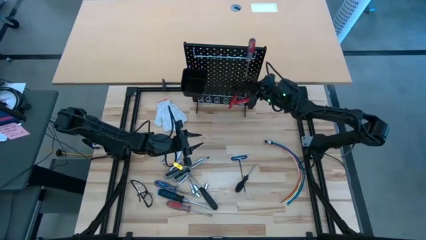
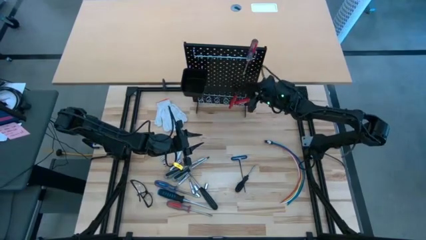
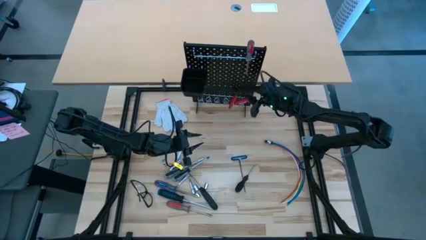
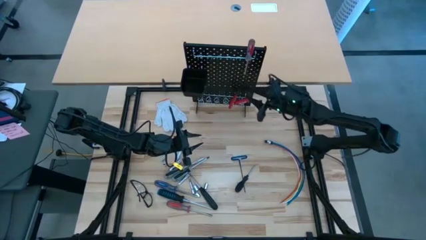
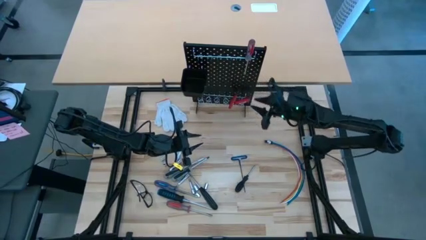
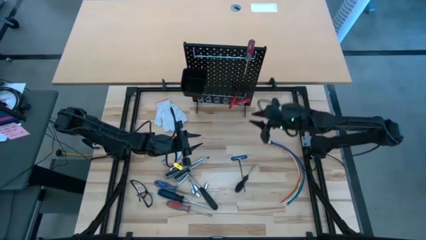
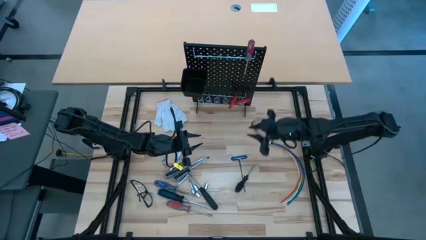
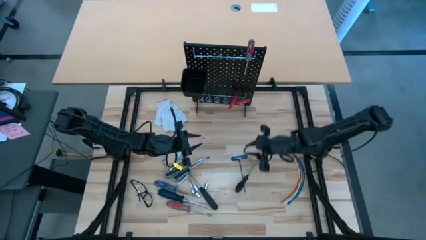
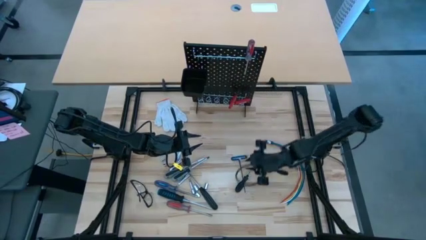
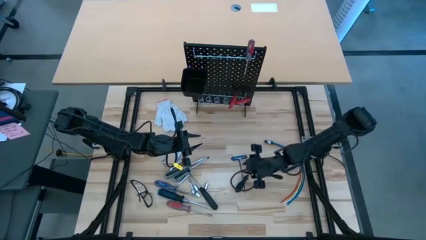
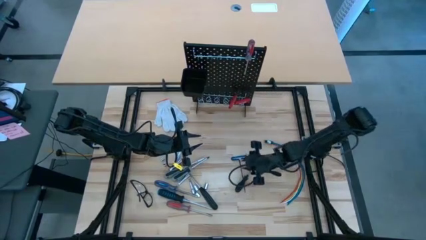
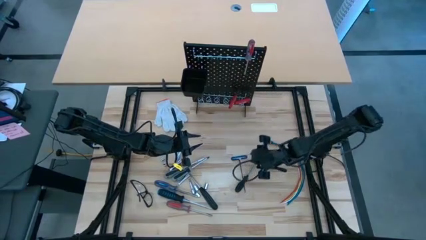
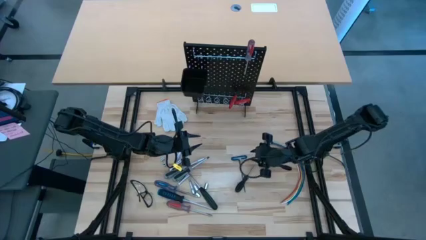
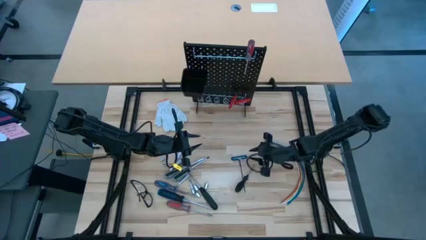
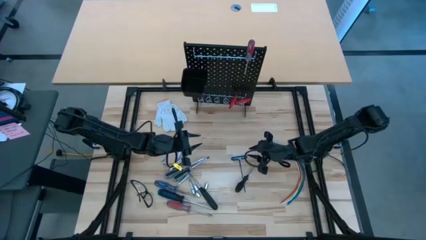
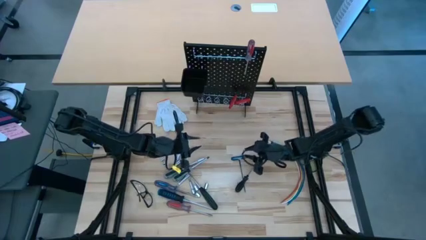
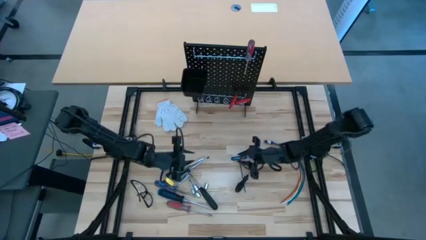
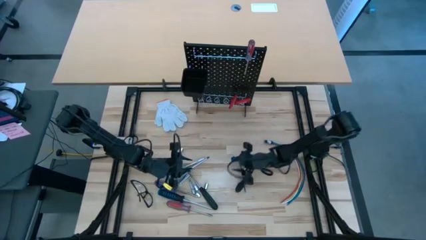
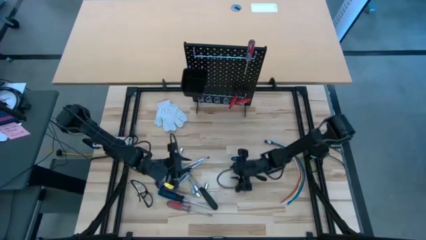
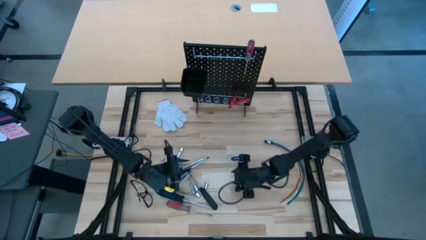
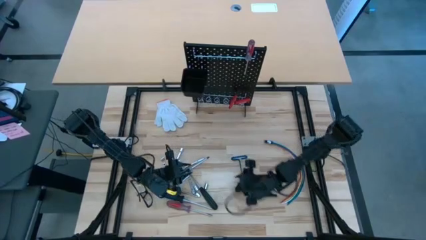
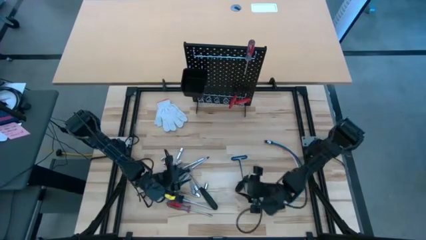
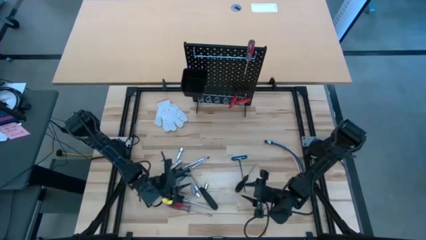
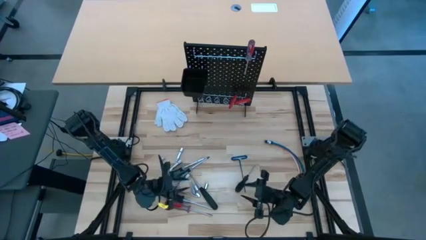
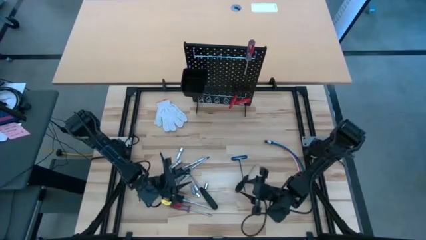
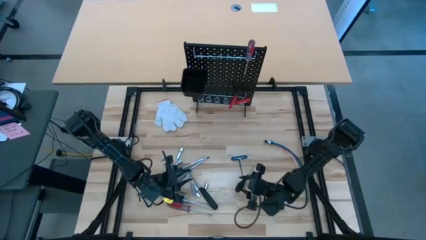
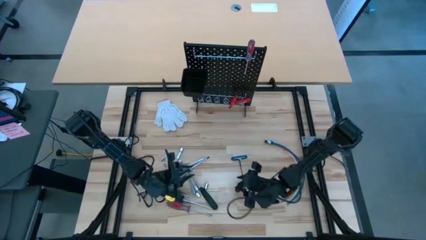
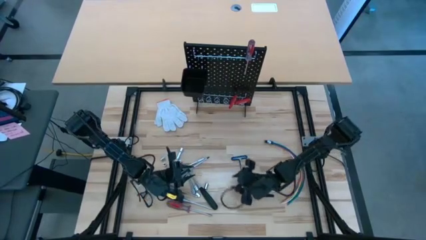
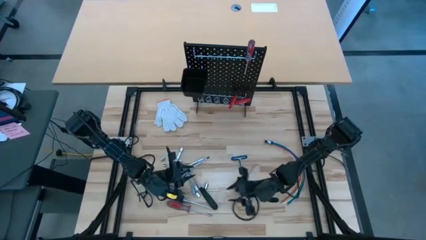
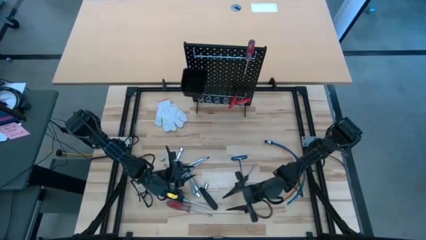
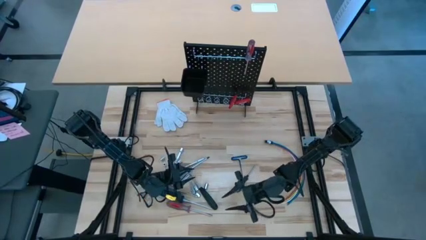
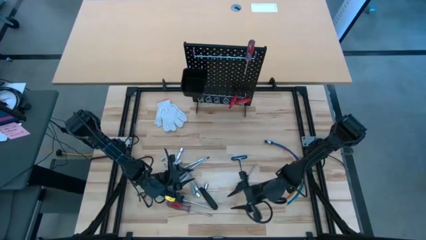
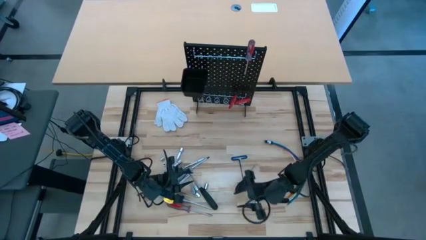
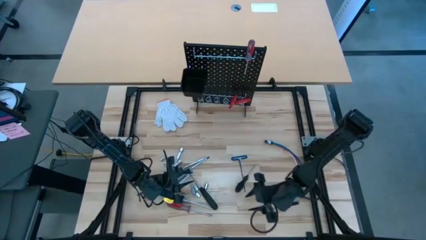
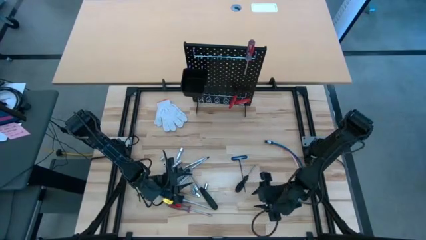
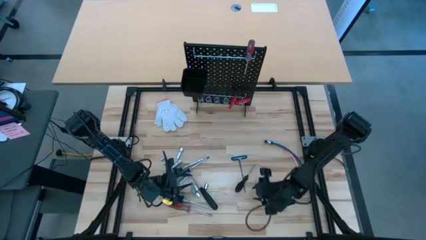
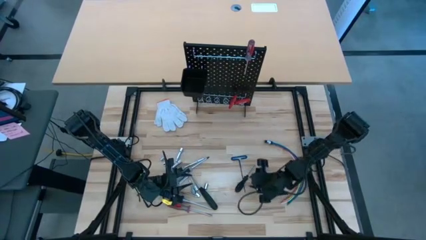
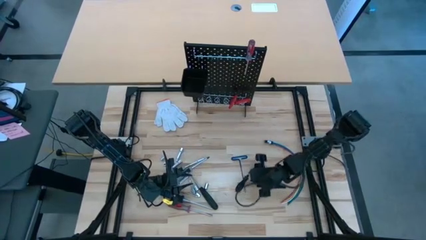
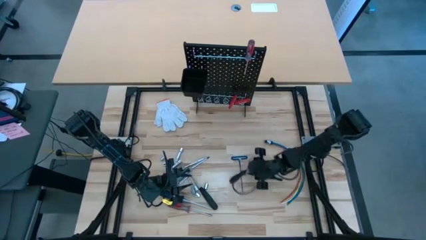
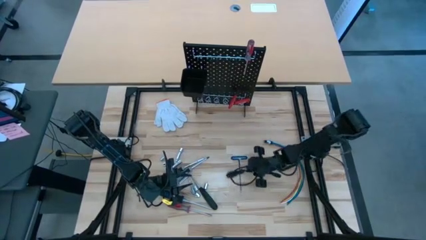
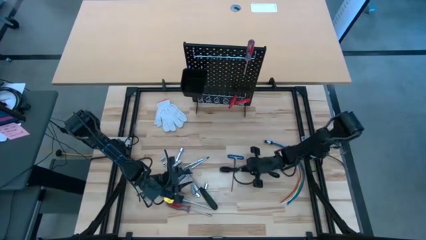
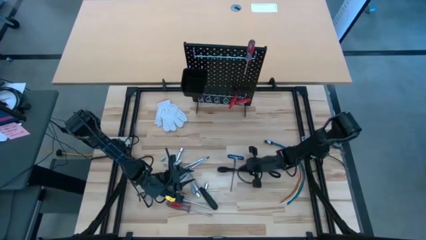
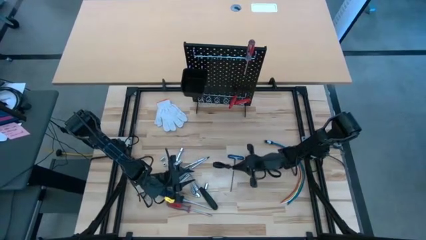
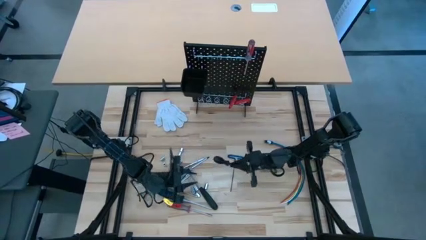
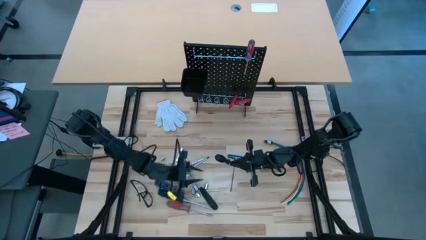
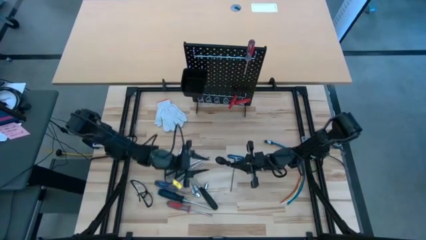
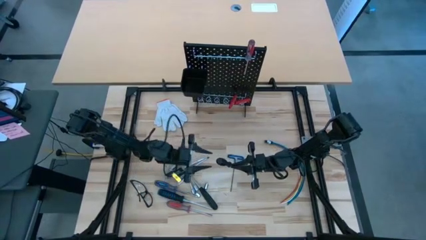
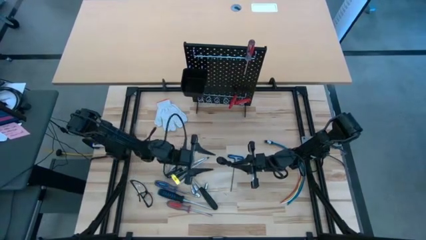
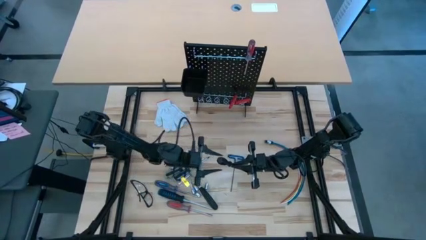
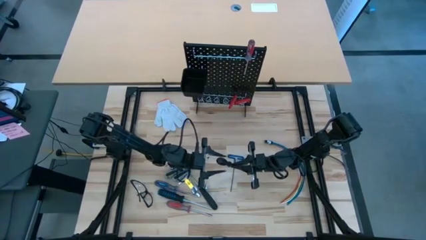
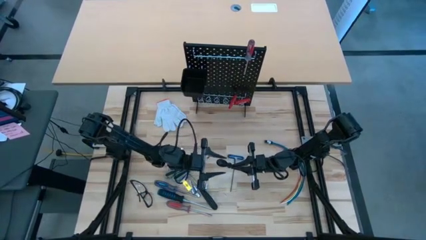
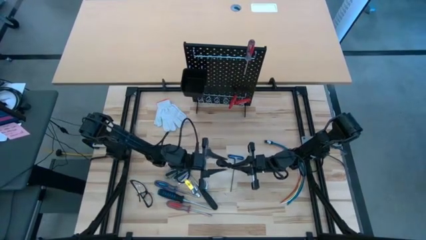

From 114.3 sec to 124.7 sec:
Task: Hang tools onto peg board
Hang the black screwdriver on the pegboard

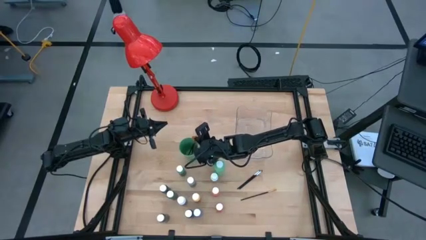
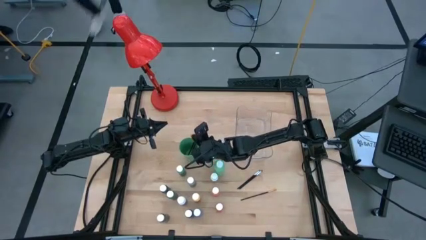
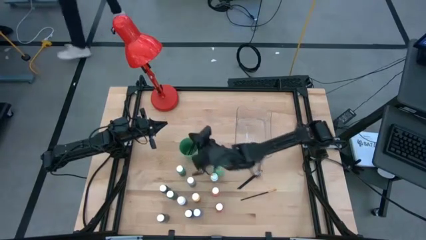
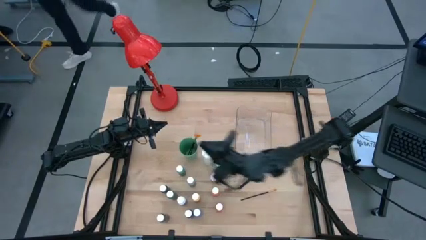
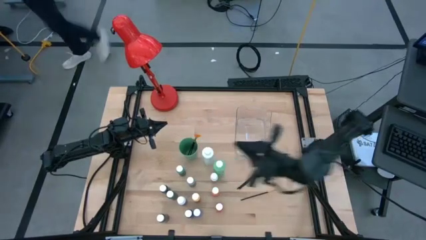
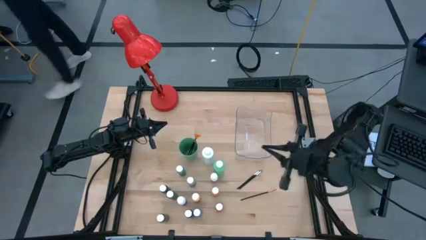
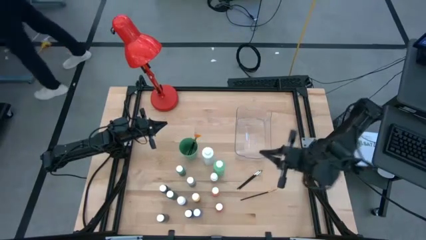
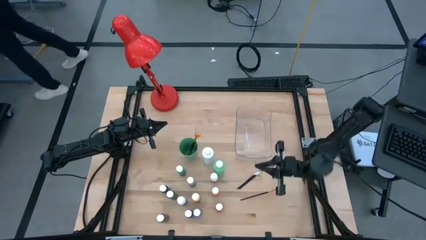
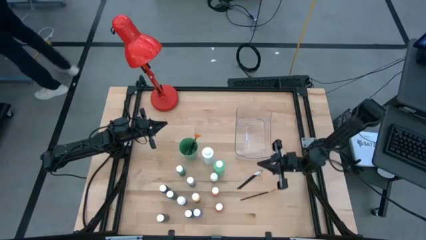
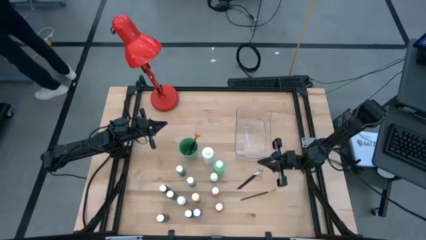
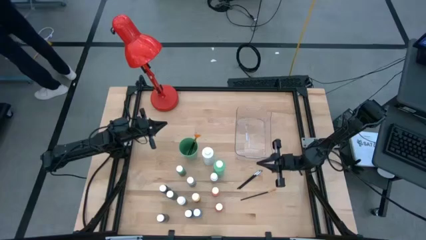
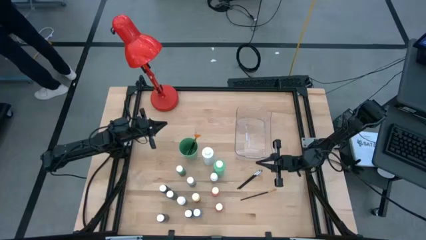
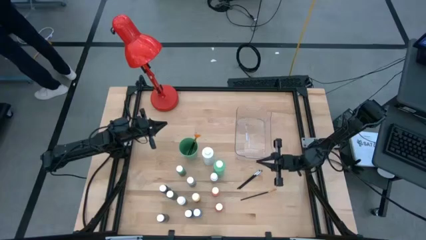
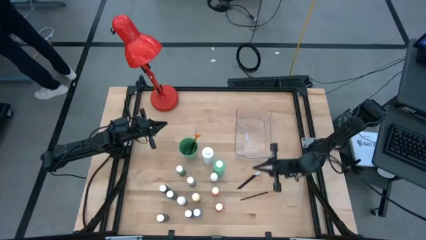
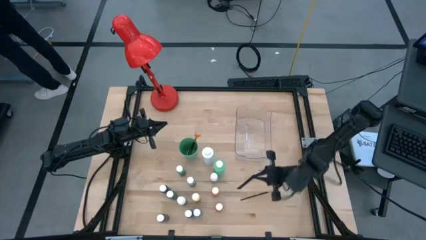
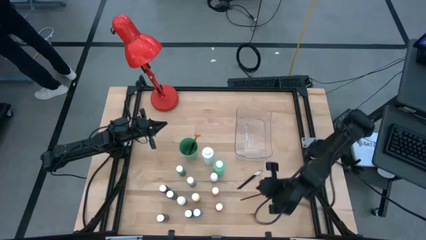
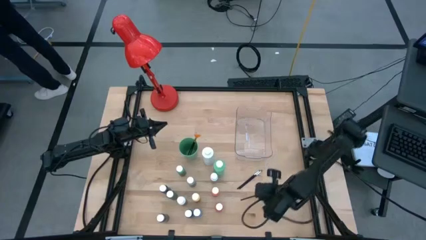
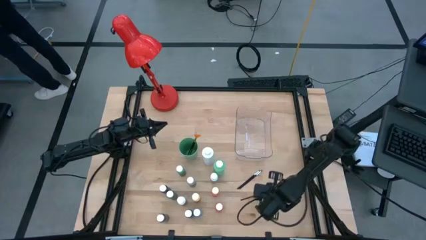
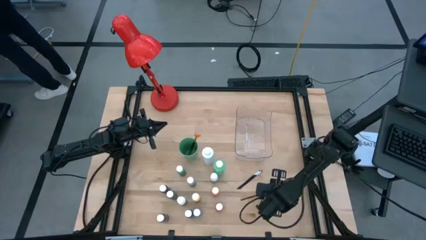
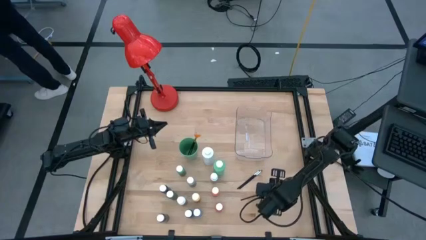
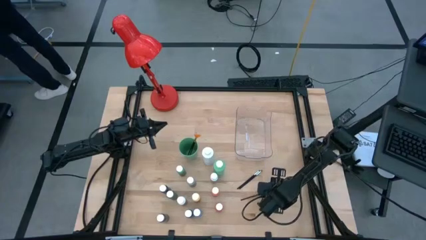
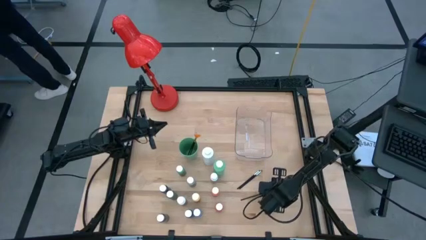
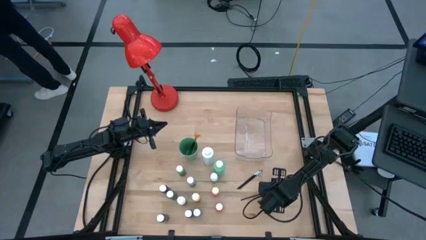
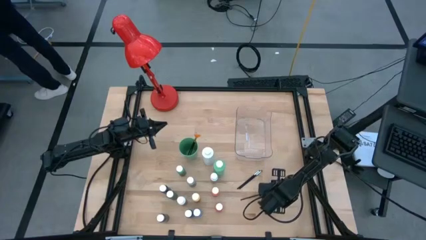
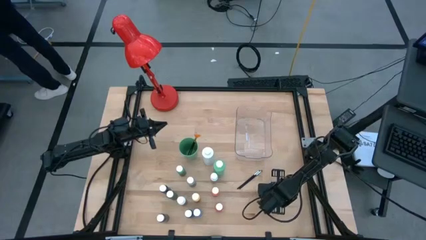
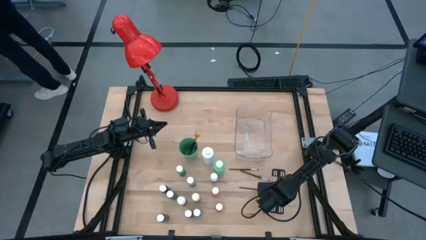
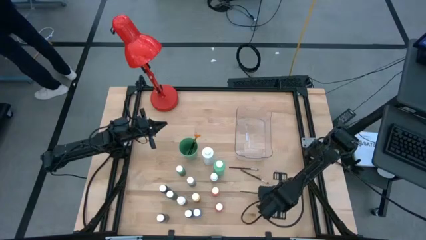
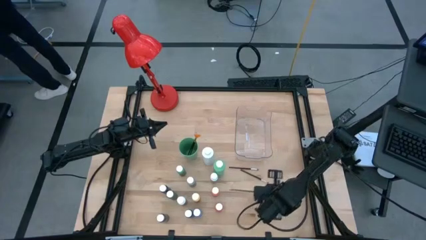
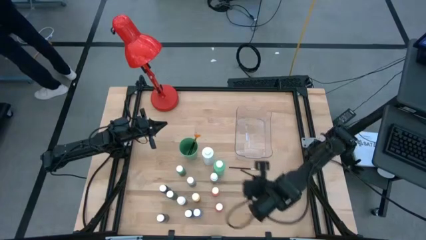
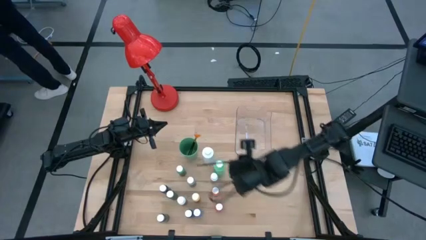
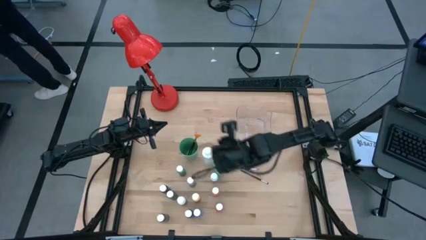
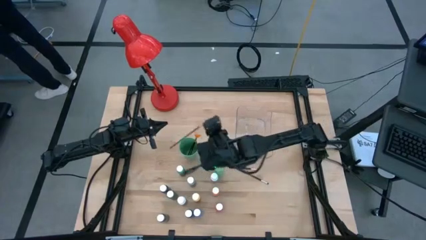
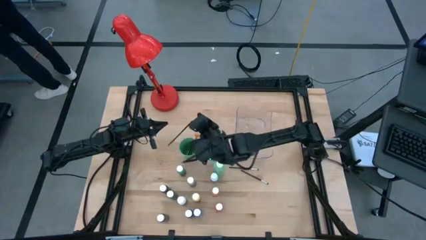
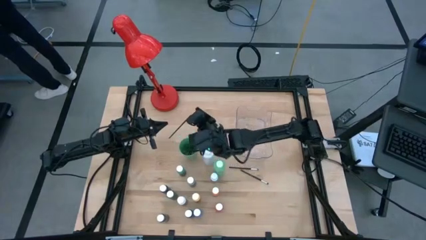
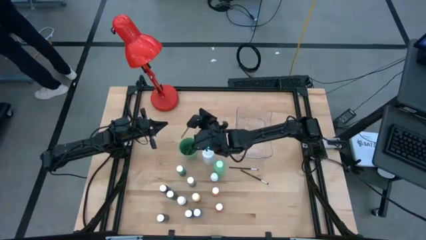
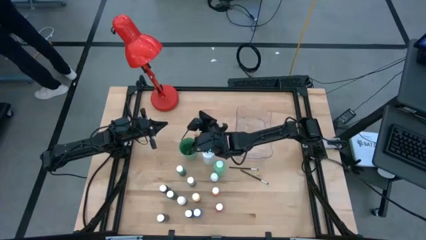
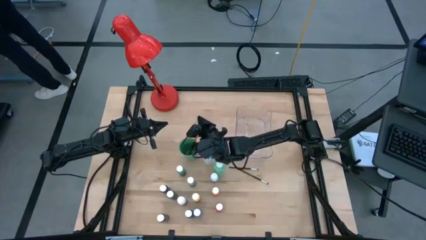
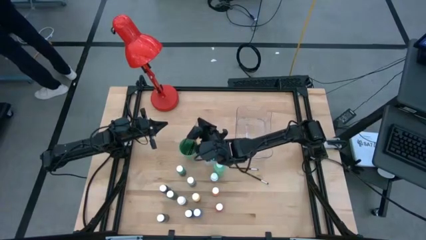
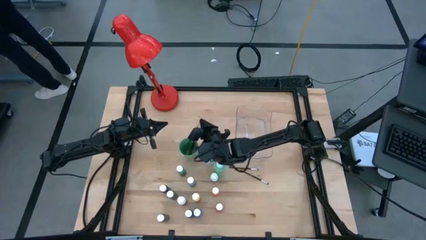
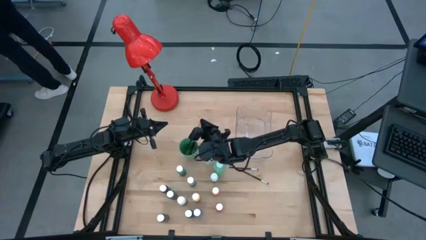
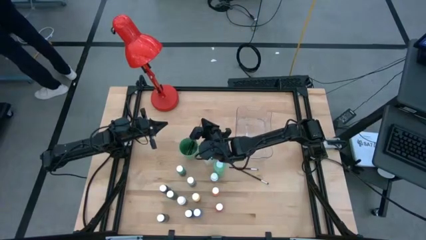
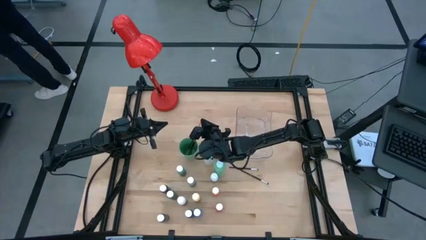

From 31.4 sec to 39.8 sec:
Task: Pick & Place Paint Supplies
Put the gold paintbrush into the green cup
